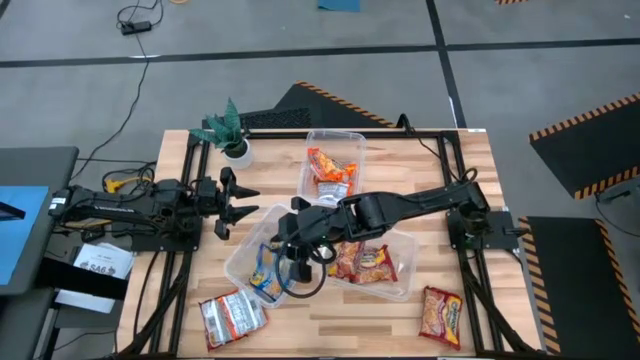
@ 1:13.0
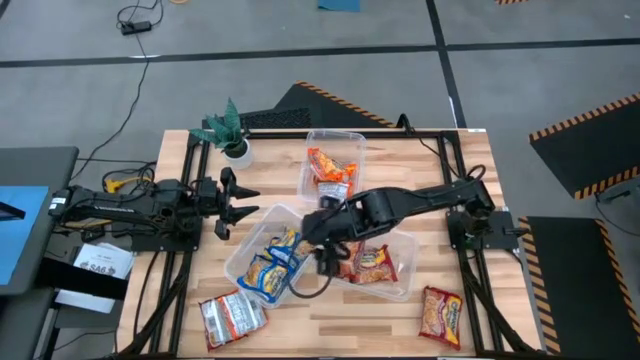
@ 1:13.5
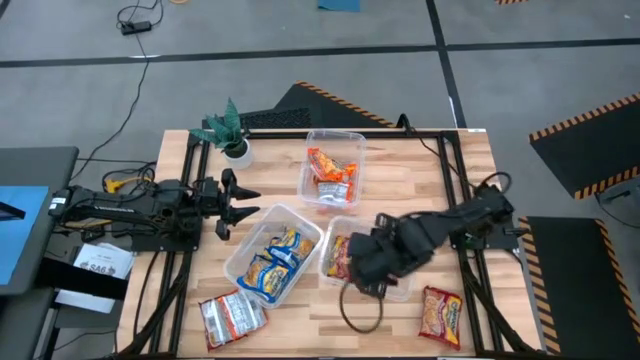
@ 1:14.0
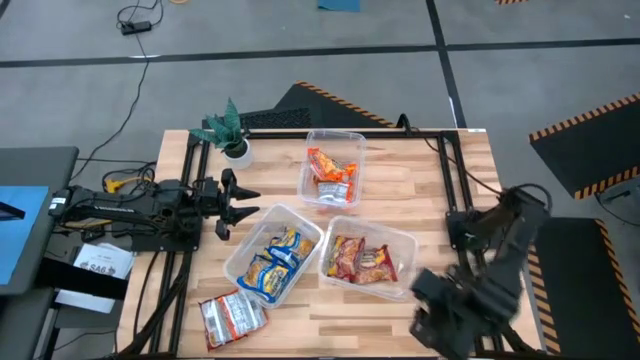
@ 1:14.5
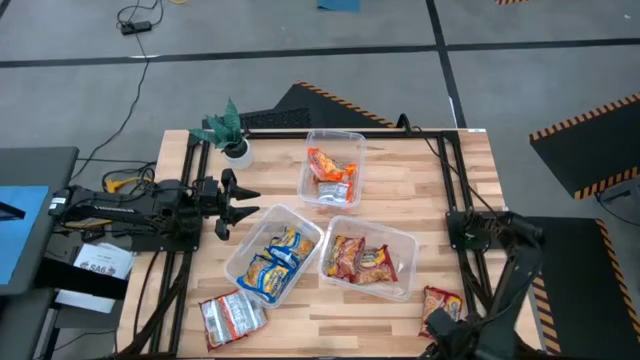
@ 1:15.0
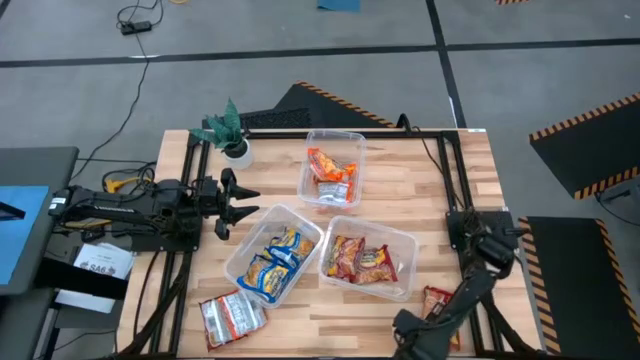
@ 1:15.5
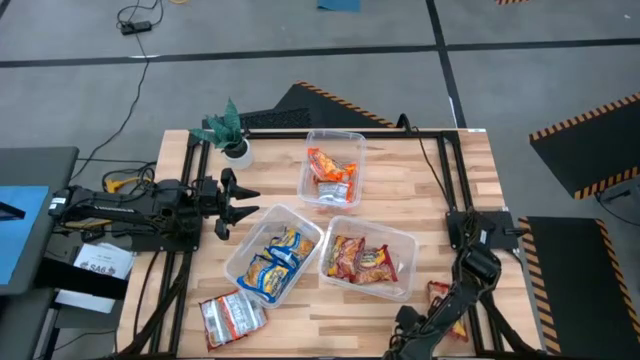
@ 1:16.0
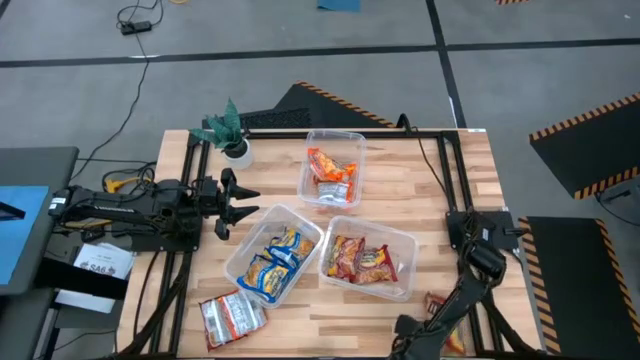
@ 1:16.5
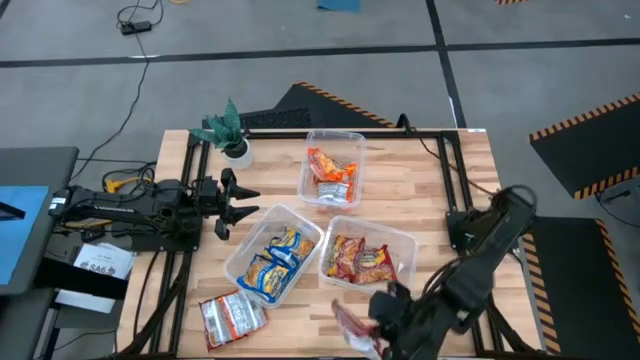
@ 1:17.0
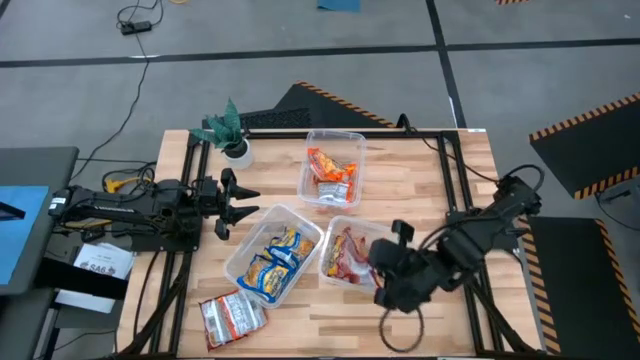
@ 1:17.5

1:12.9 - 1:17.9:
Task: Sort Maruchan noodles
Put the red noodle into the bottom right transparent bin

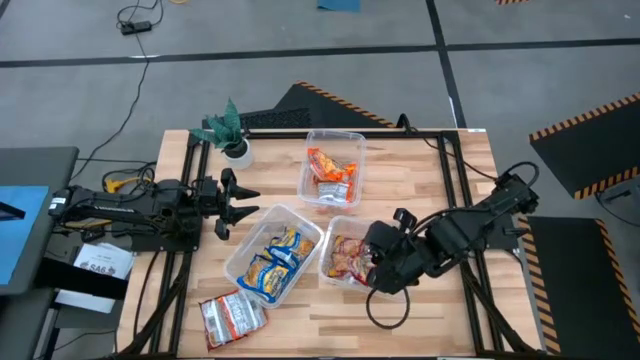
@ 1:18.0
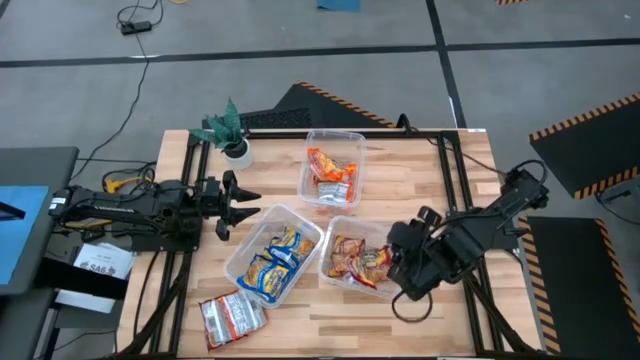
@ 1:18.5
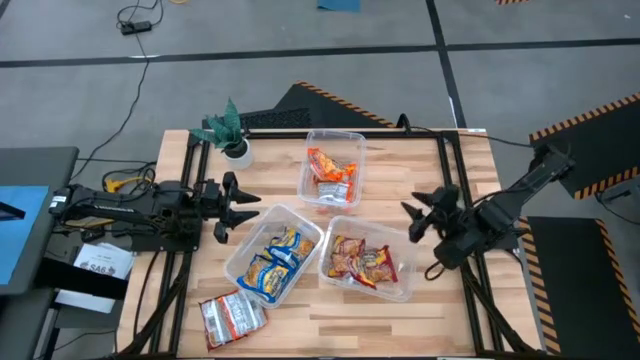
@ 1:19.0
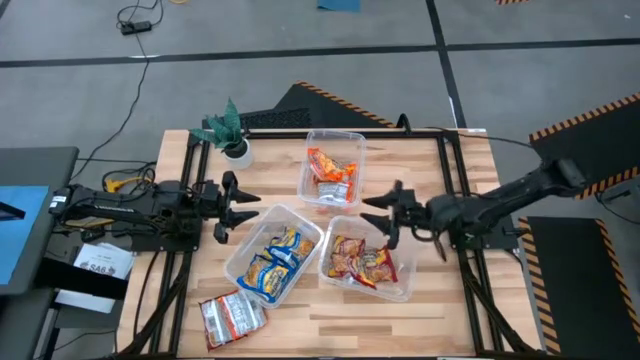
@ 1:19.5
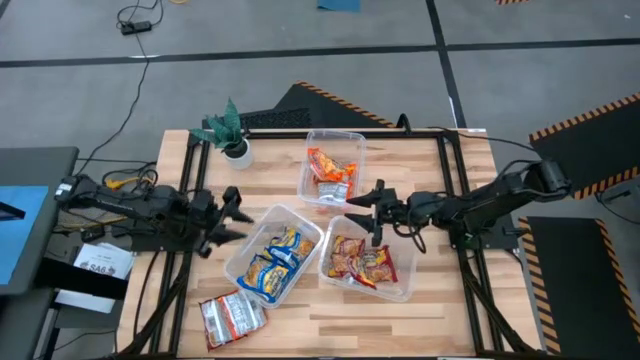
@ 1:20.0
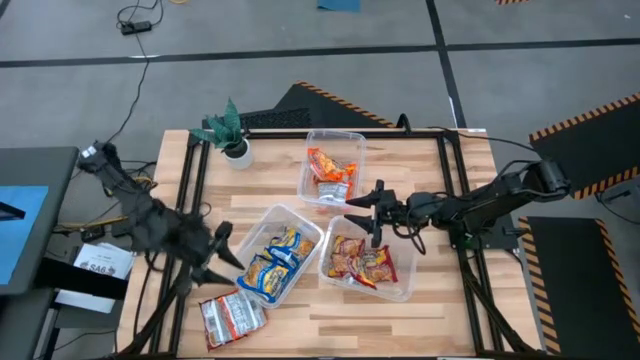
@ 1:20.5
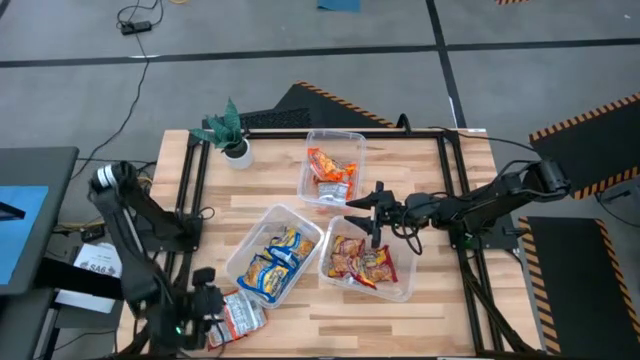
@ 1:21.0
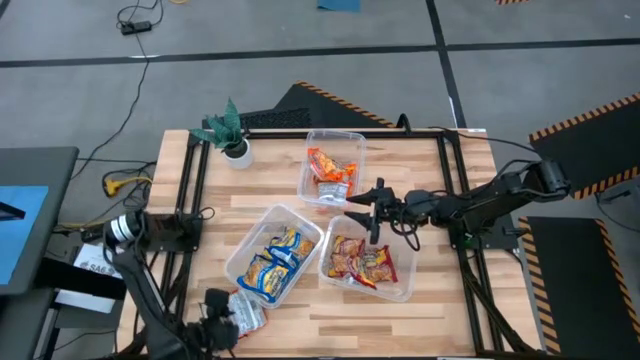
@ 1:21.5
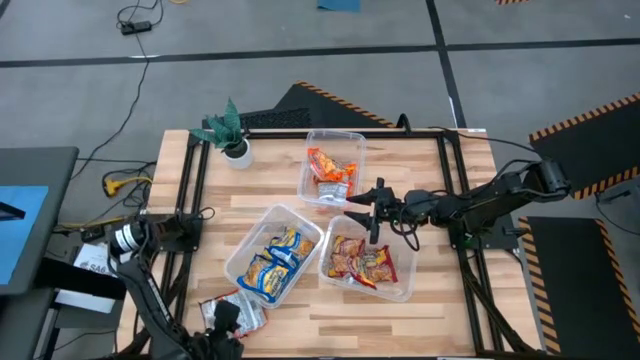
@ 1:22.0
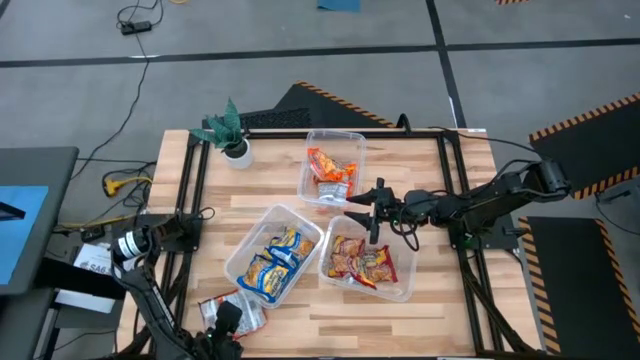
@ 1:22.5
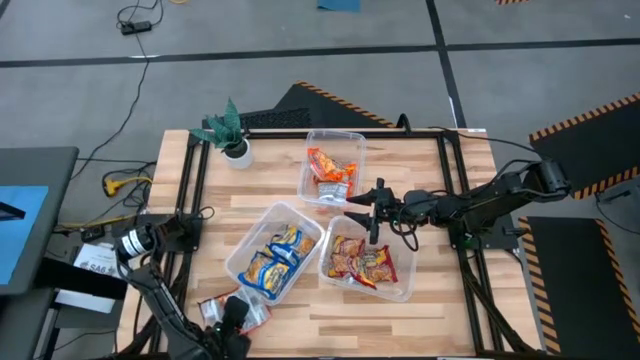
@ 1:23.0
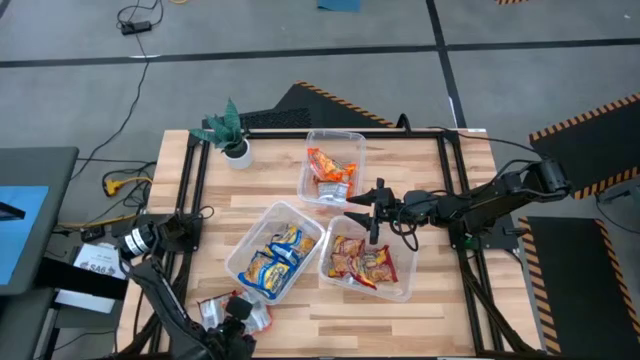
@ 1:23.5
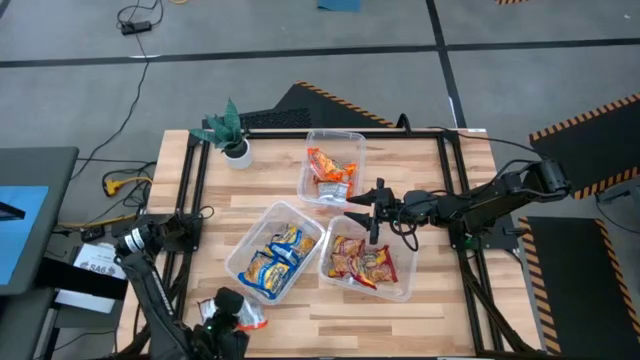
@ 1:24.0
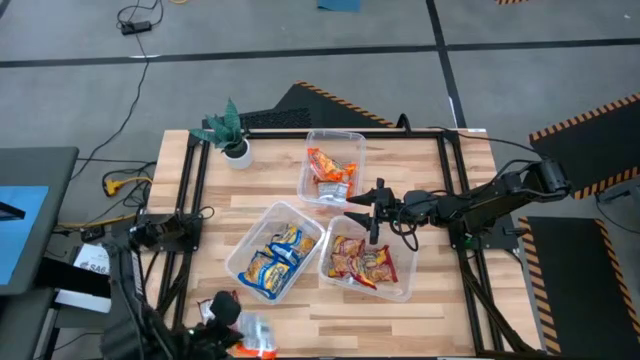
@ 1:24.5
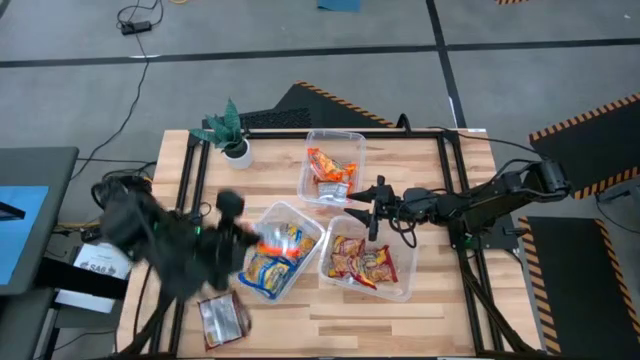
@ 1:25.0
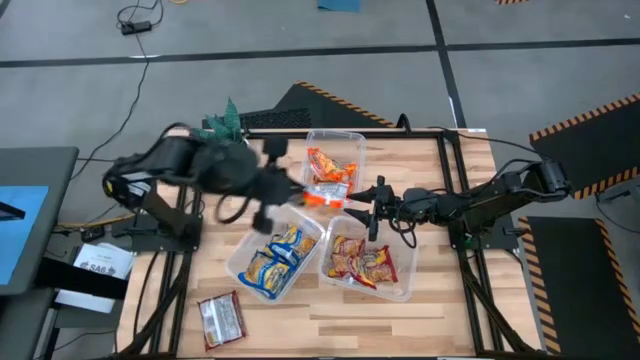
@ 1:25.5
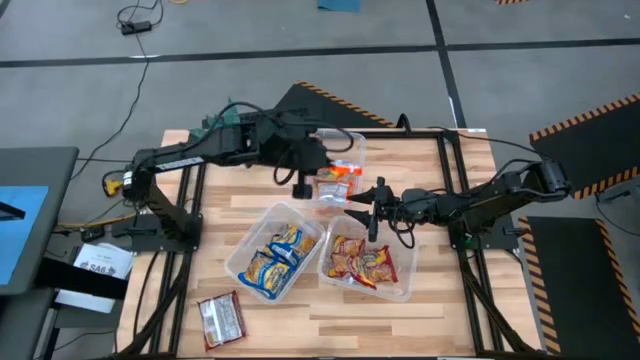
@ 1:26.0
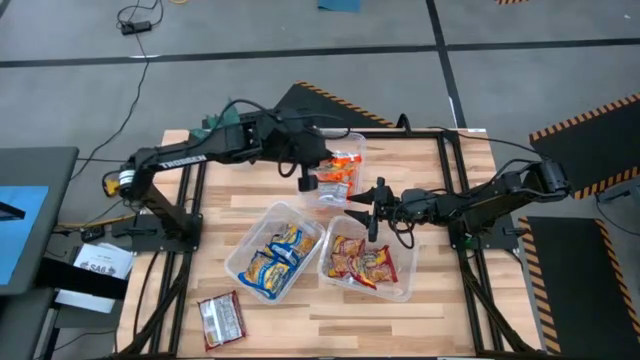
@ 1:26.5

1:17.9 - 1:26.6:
Put the orange noodle pack into the top transparent bin

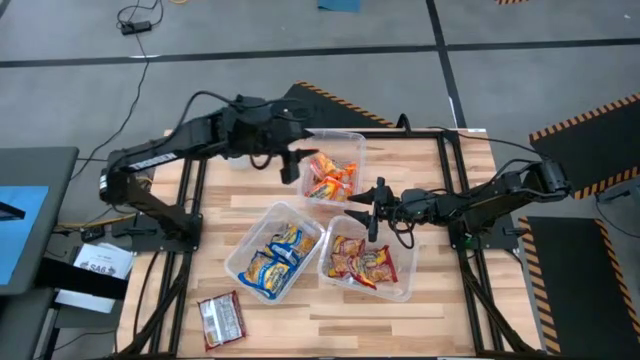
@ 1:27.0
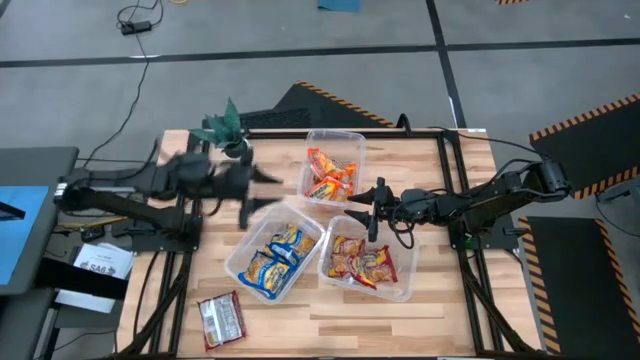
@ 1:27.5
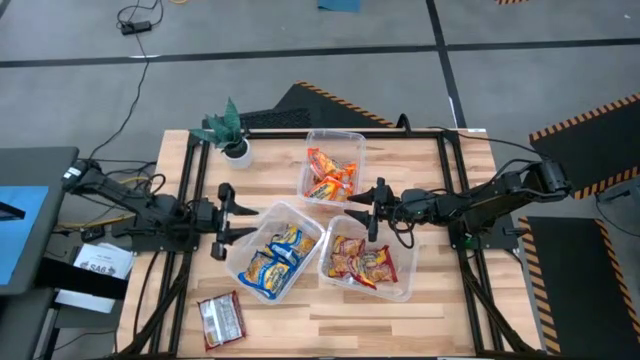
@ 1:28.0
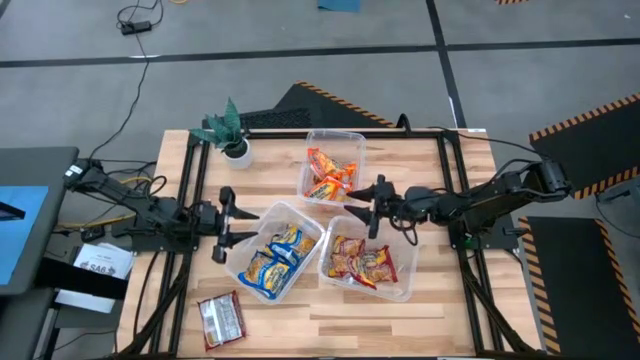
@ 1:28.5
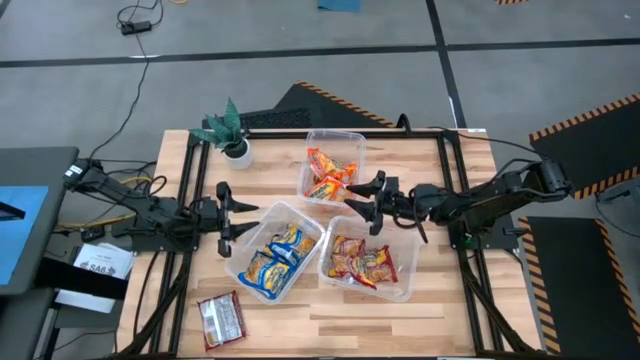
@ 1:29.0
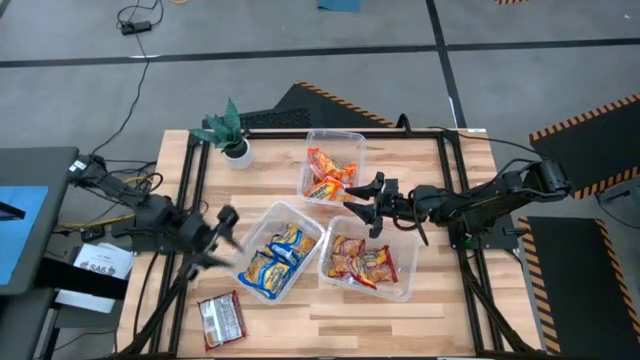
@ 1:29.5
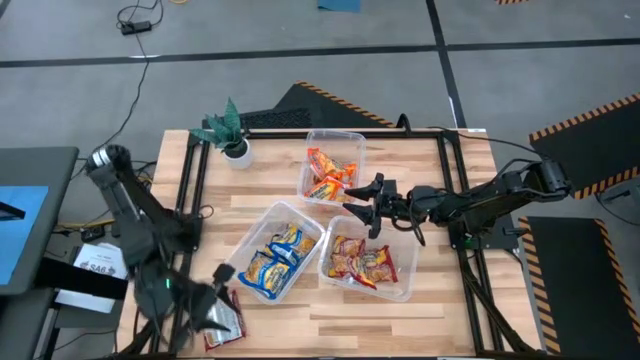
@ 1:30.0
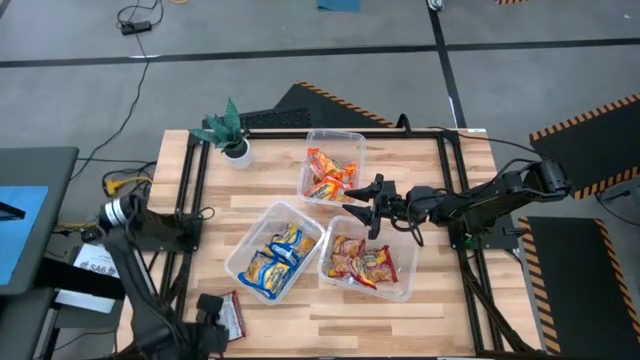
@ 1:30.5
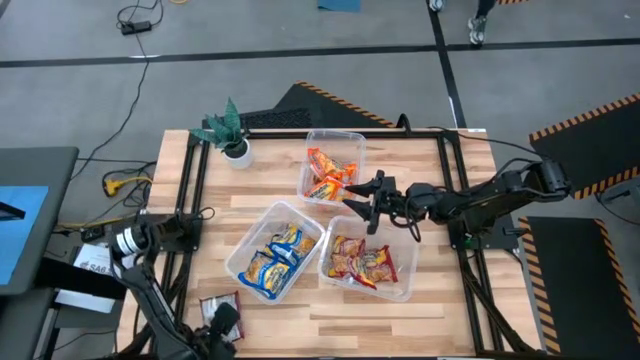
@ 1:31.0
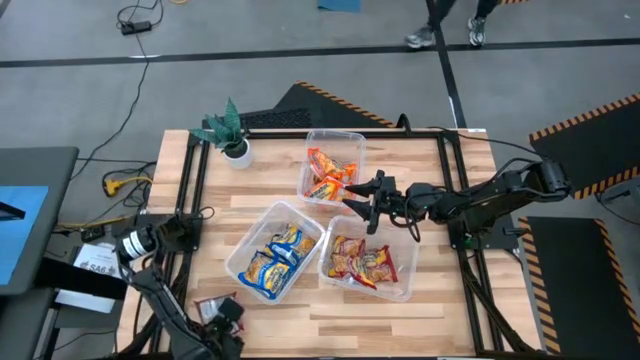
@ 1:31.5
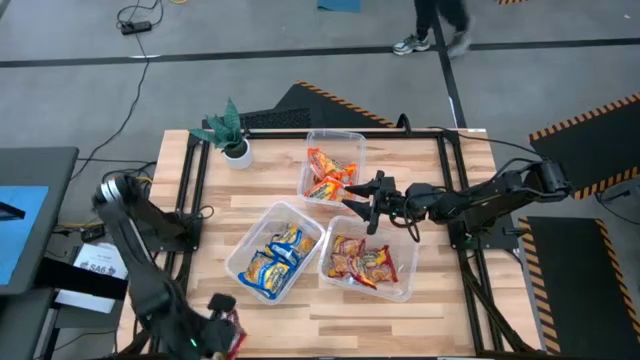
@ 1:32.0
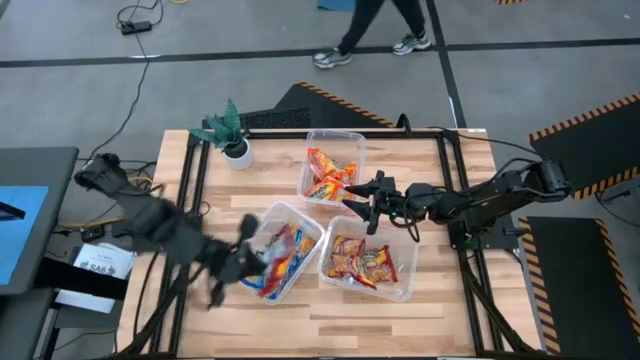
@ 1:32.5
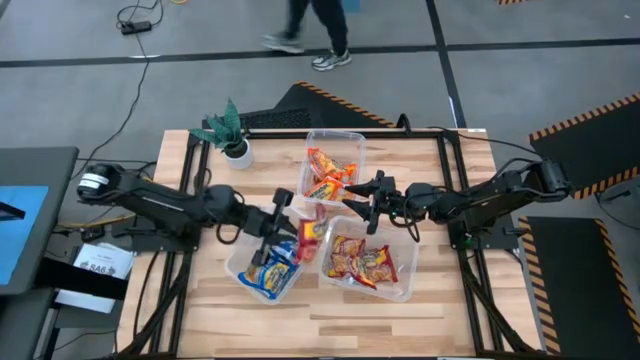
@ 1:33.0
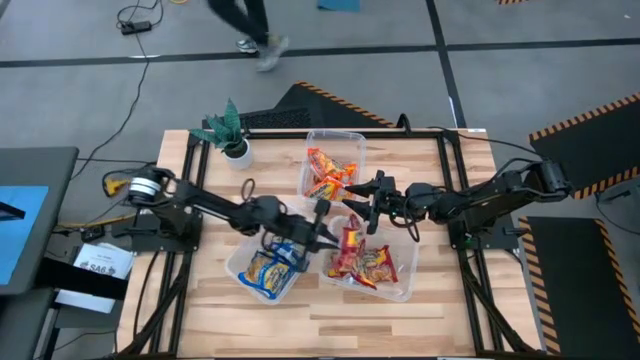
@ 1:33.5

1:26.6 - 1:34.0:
Put the red noodle pack into the bottom right transparent bin
